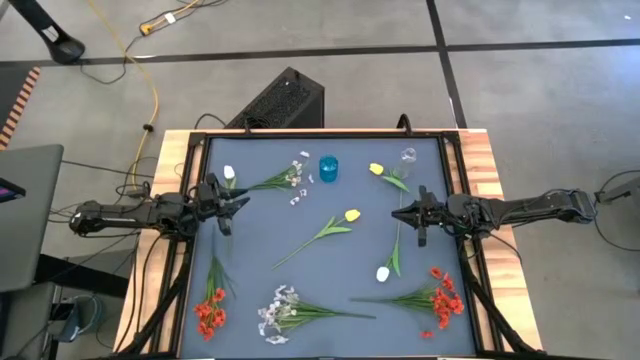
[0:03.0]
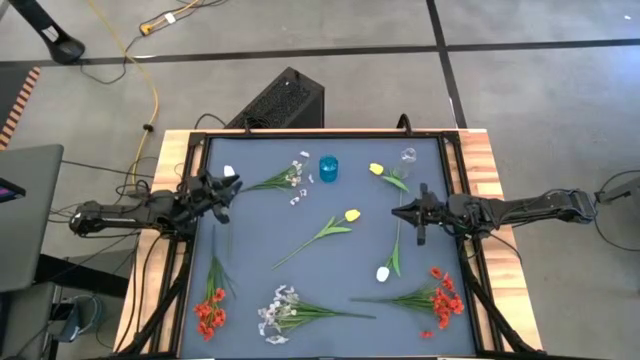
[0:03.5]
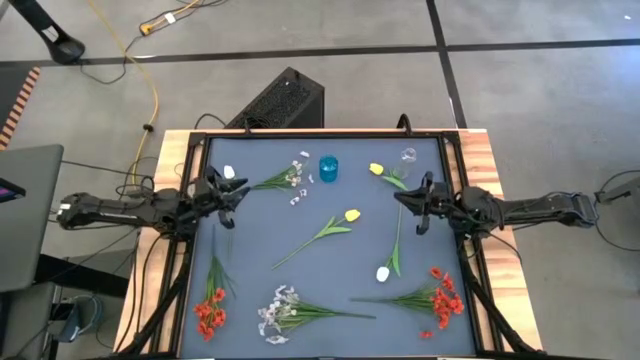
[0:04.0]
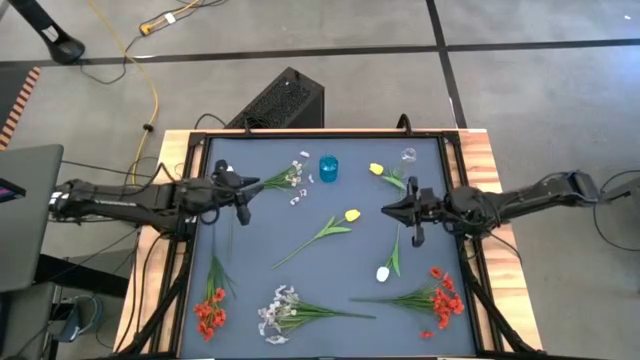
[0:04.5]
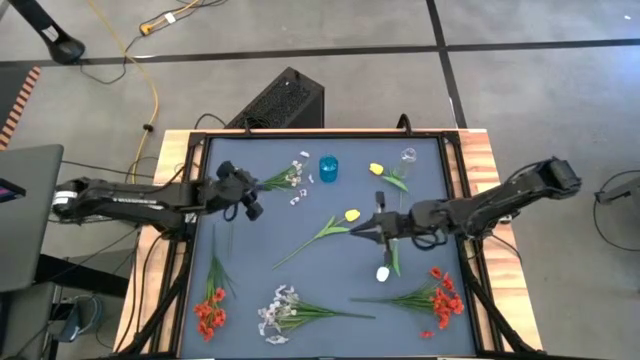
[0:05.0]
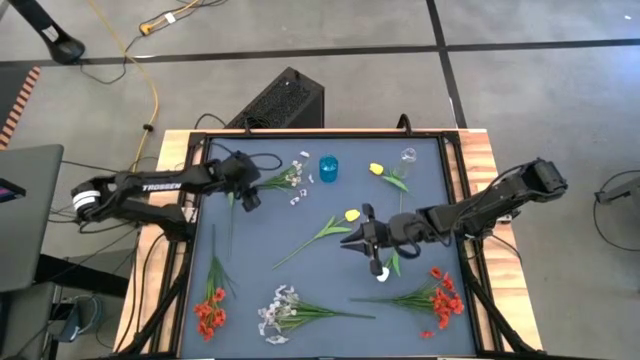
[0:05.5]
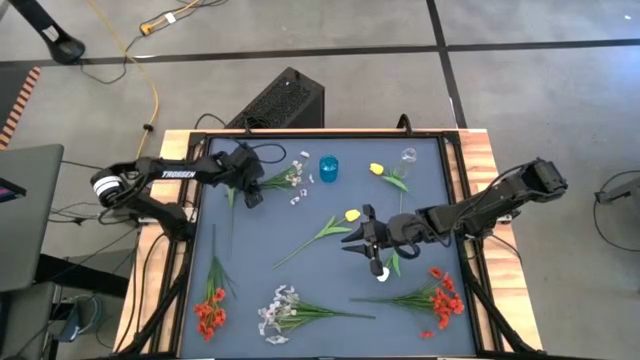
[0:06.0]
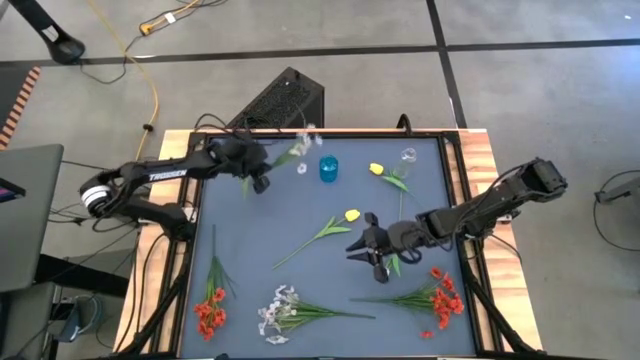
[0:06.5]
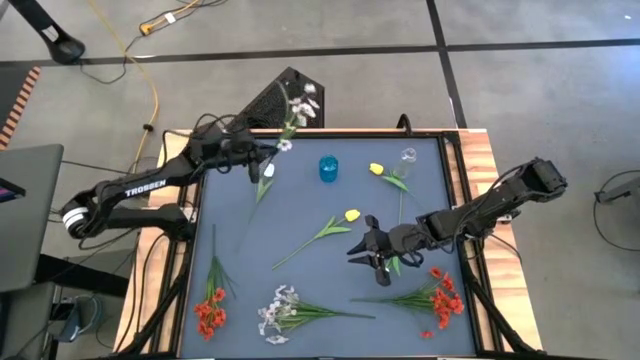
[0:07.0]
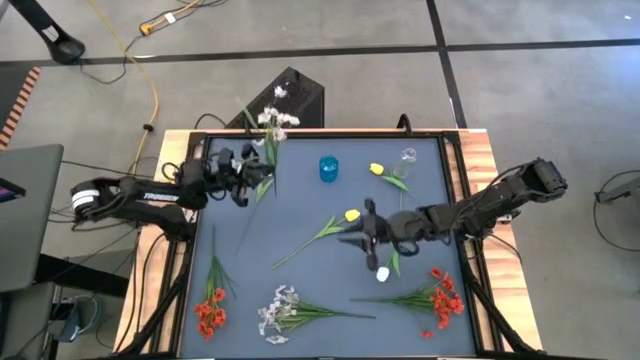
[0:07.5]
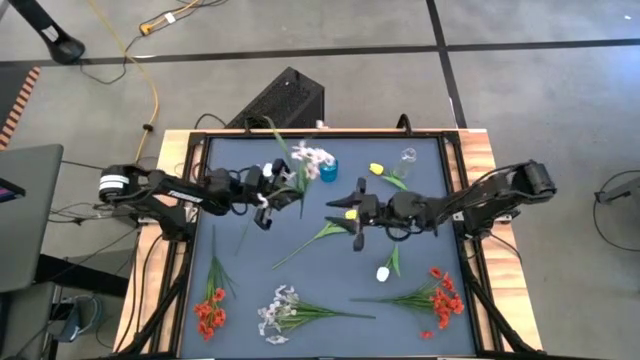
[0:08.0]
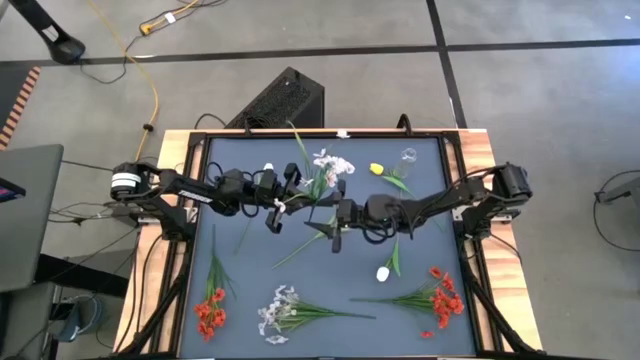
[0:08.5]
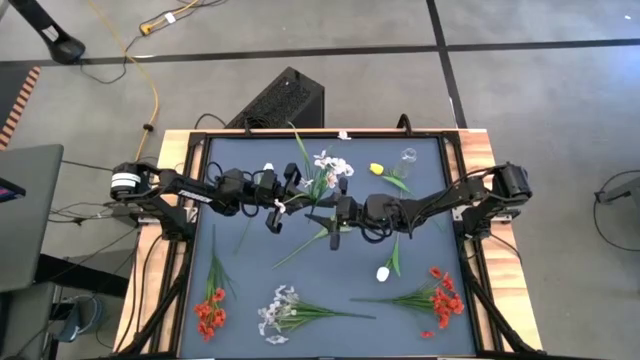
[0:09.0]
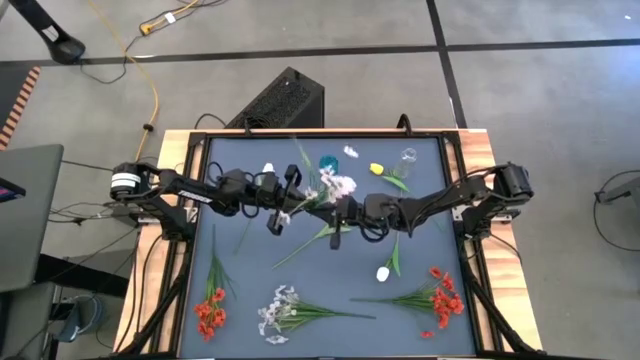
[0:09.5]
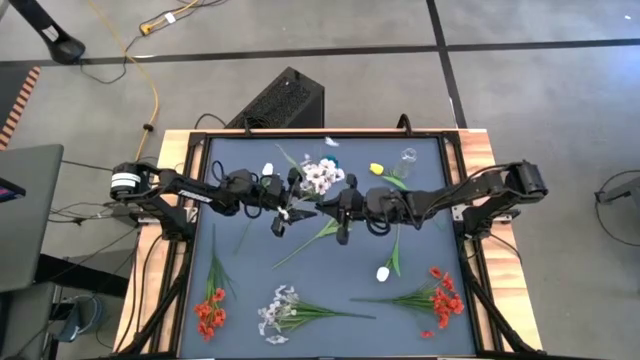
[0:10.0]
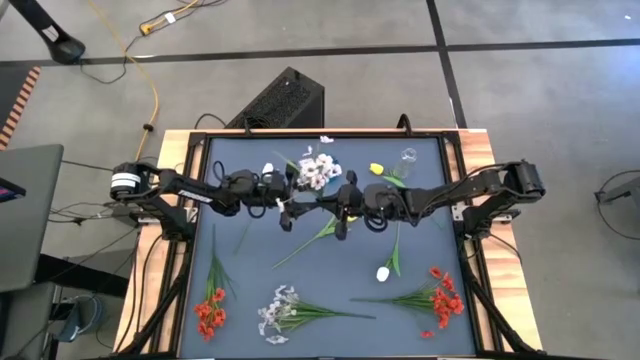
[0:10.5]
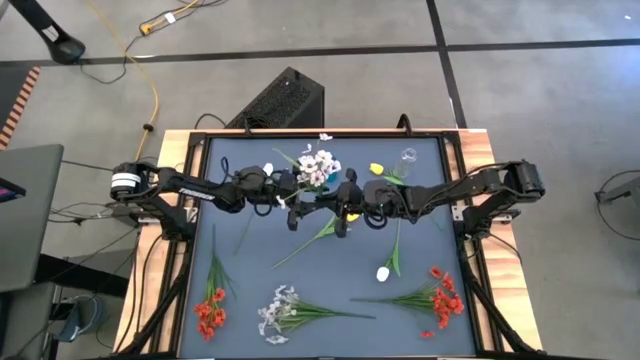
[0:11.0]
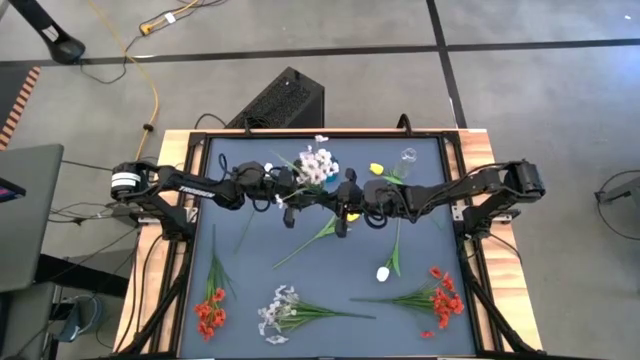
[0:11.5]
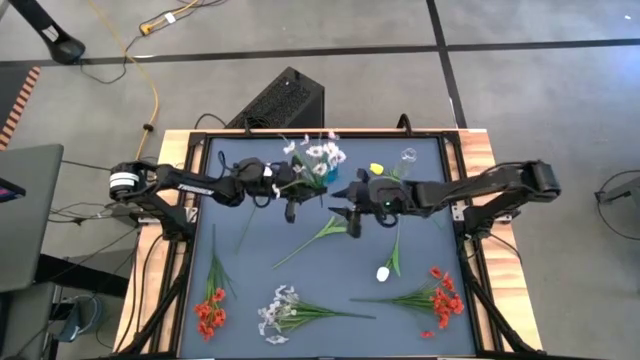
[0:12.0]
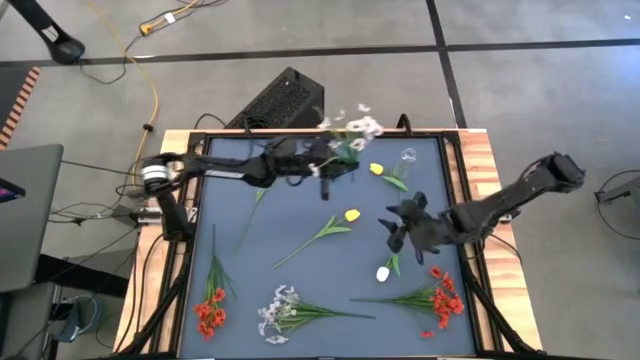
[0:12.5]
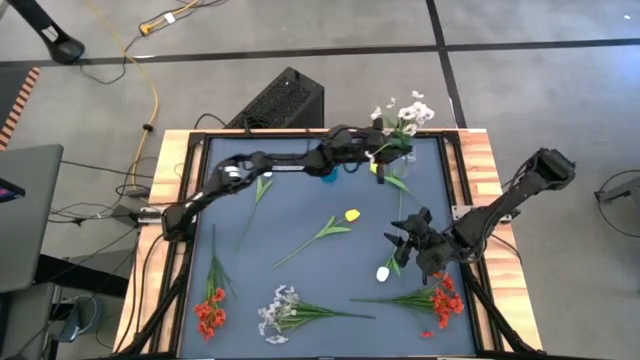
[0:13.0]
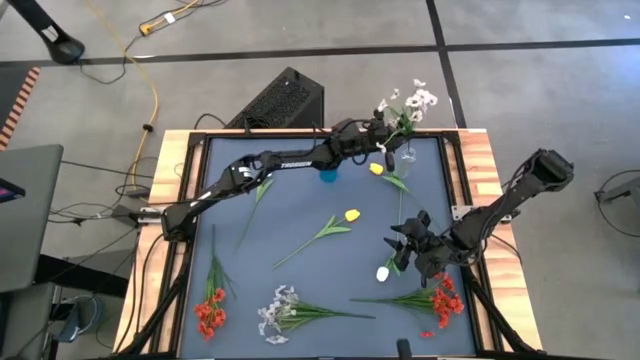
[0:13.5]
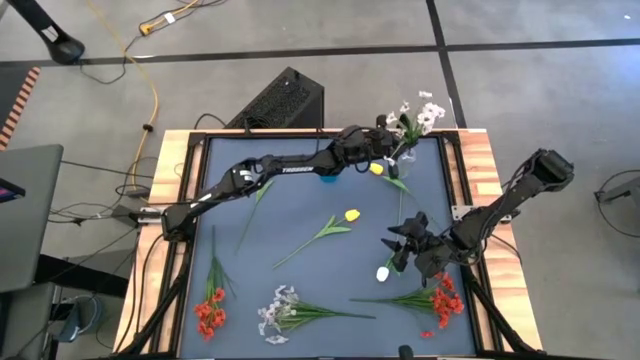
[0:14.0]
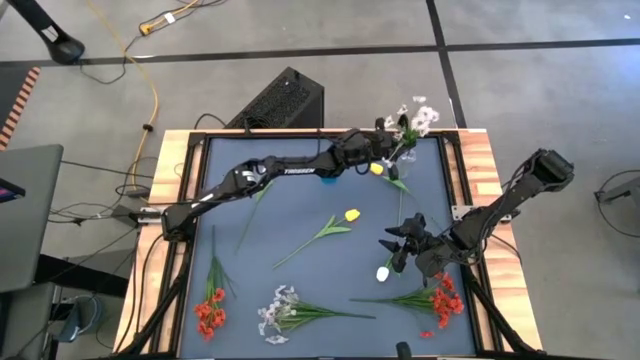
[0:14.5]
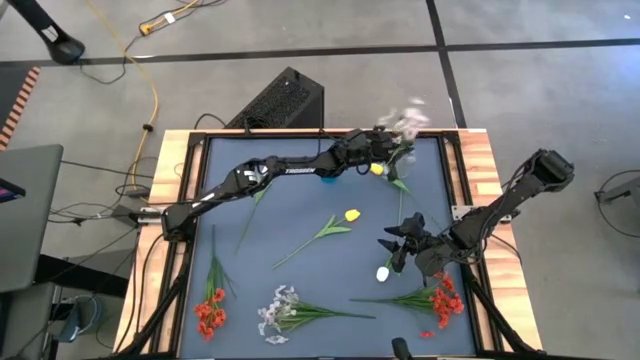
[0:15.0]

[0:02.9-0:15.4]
Task: Sort flowers into vase by color
Put the top white flowers into the transparent vase
